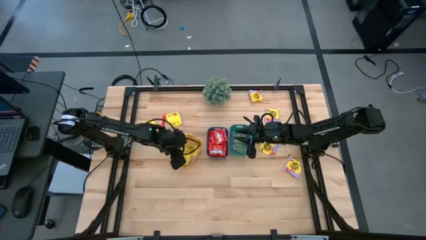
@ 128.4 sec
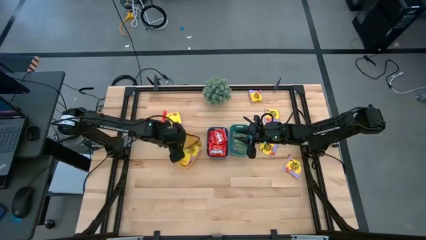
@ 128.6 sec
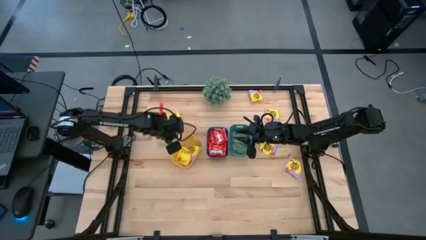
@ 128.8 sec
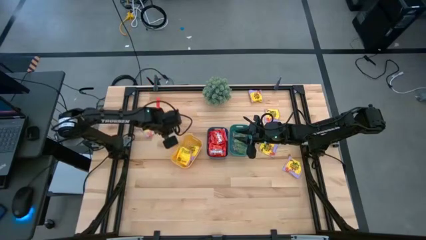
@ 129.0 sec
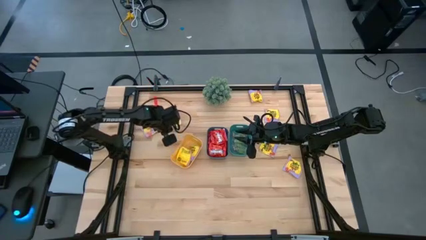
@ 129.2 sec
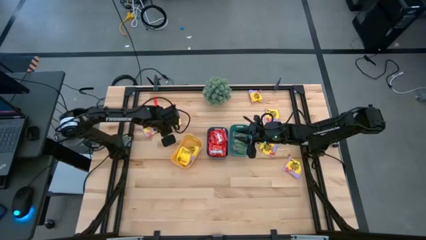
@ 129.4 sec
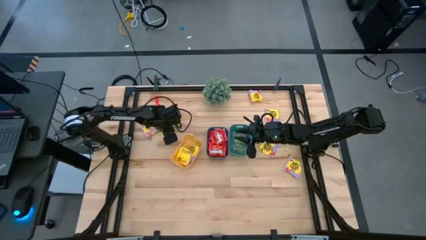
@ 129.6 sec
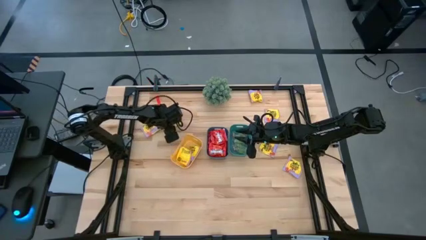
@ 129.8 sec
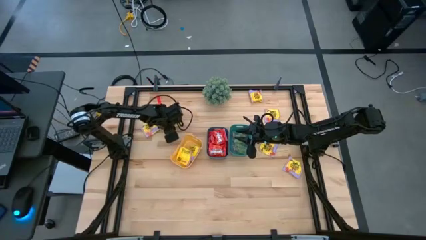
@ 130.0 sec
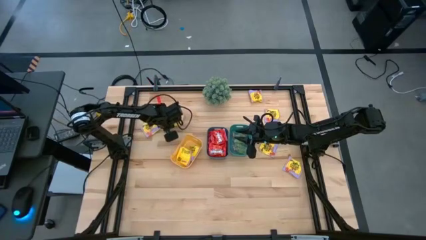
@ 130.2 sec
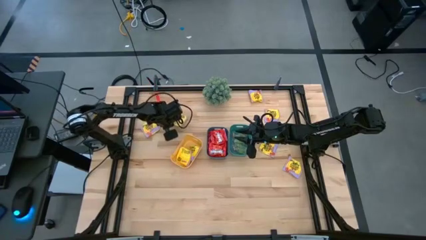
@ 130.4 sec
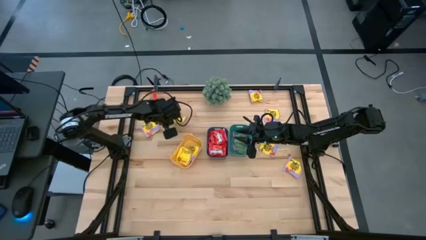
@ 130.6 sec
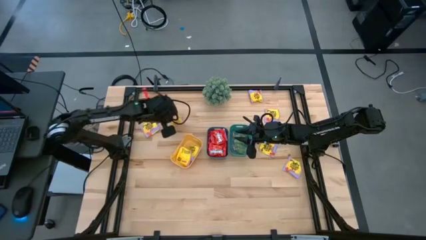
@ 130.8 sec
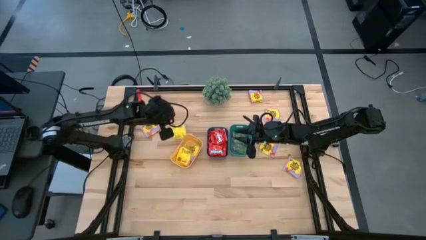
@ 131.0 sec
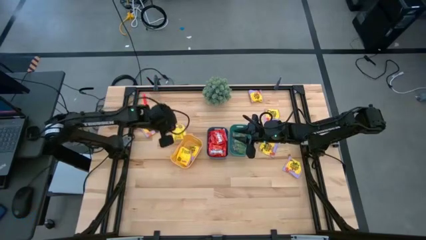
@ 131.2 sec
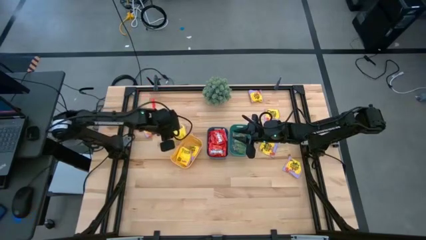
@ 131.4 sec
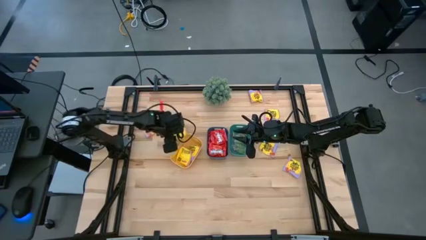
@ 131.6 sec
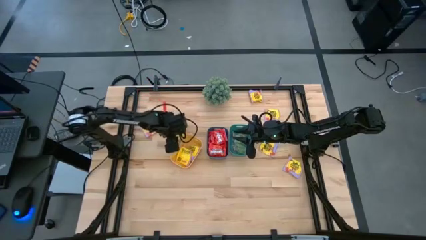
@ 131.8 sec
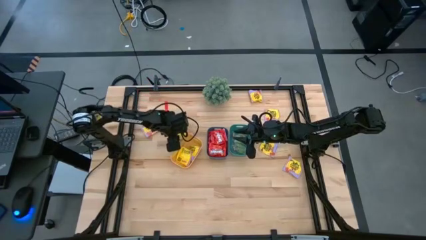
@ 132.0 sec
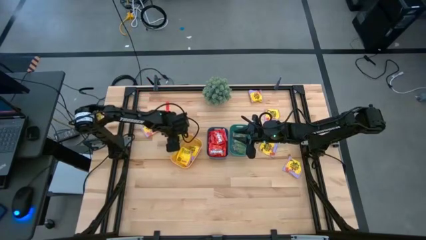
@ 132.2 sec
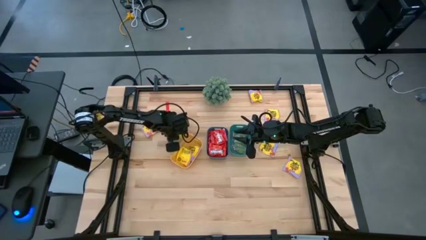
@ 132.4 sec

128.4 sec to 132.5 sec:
Task: Sort candy
Put the yellow candy pack into the yellow bin

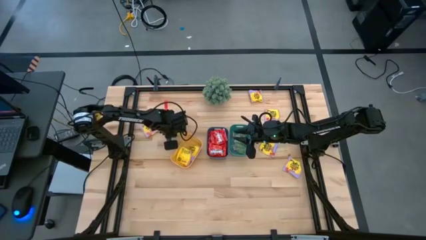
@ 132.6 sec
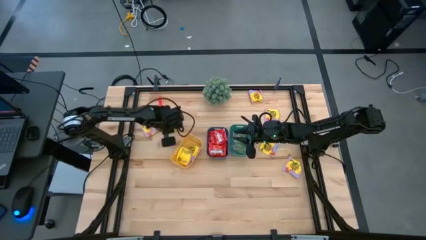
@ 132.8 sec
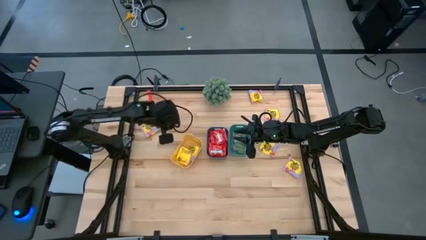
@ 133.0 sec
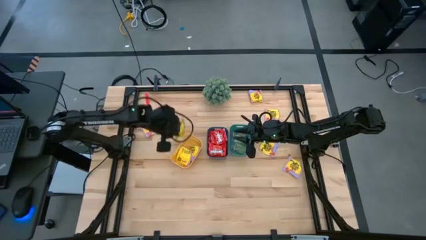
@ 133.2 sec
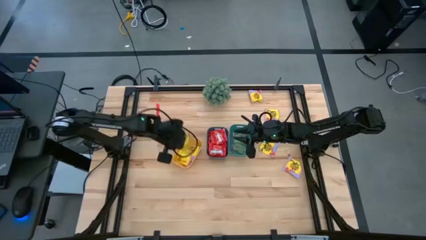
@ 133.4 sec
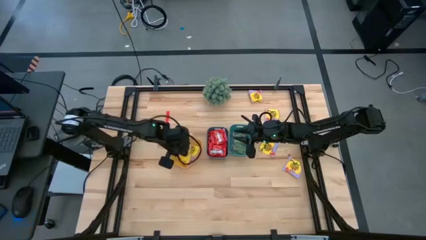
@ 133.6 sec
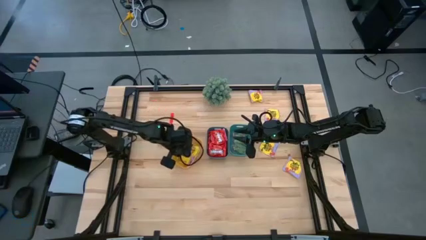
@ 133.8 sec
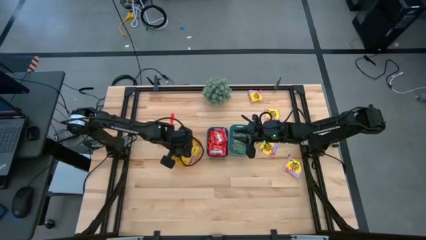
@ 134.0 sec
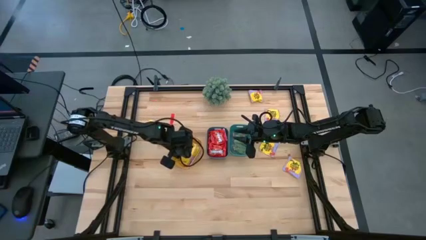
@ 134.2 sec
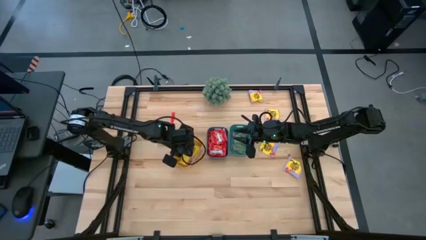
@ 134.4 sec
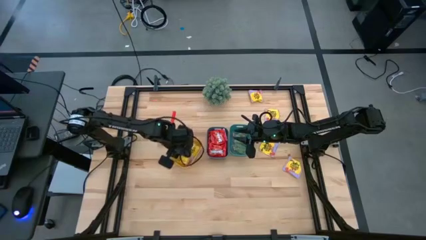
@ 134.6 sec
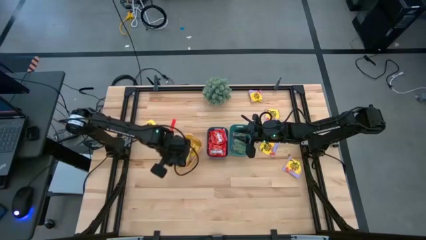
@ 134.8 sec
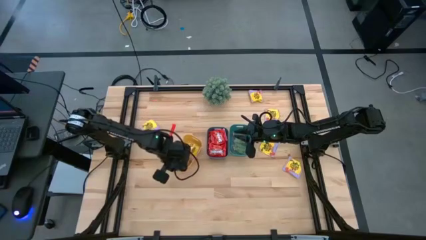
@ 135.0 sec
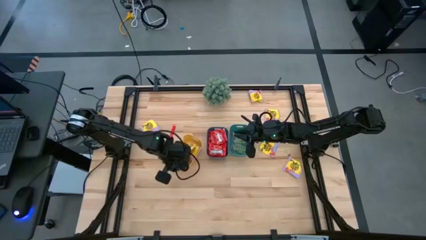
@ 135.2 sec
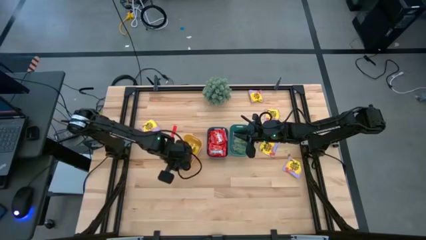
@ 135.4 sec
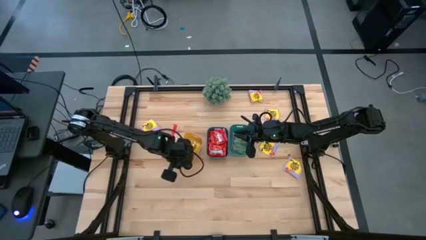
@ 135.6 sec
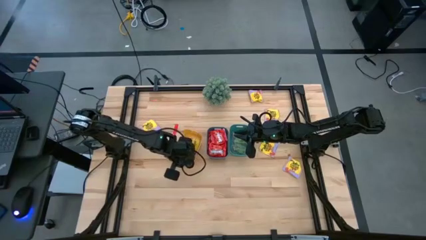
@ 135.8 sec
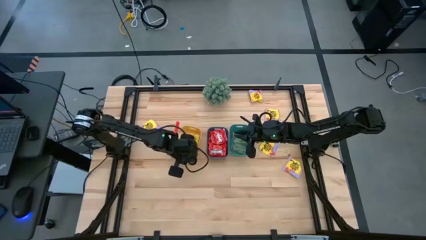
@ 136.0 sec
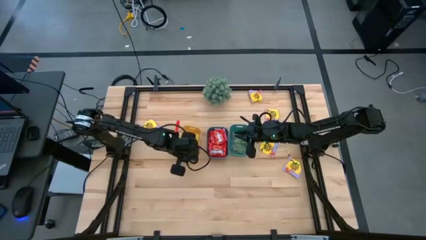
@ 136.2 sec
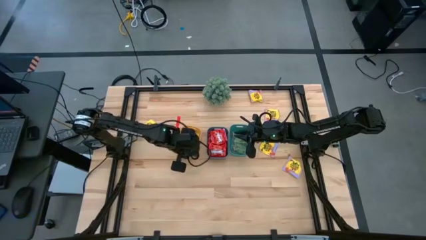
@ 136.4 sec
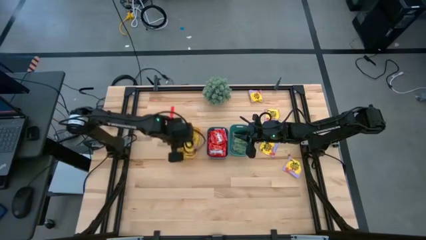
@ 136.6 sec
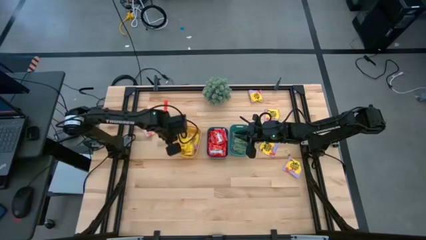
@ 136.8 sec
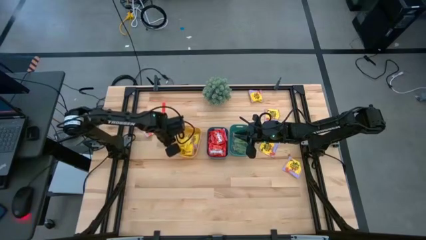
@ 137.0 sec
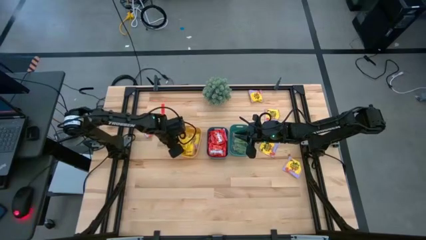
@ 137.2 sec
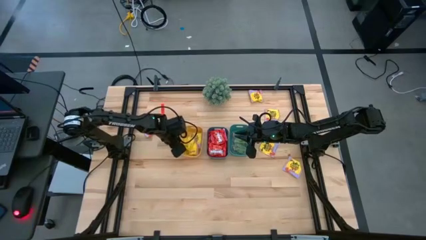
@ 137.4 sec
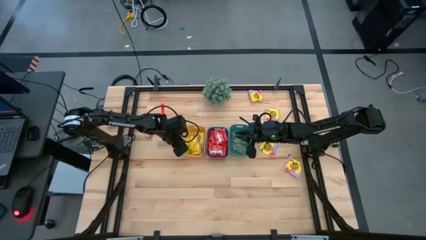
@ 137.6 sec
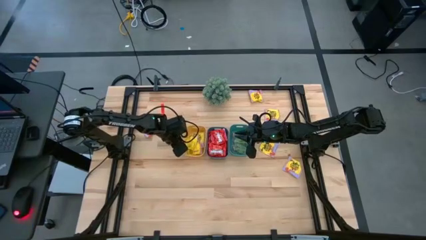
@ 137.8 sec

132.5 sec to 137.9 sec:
Put the yellow candy pack into the yellow bin

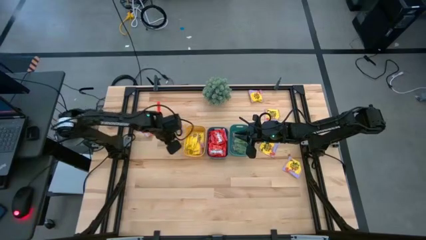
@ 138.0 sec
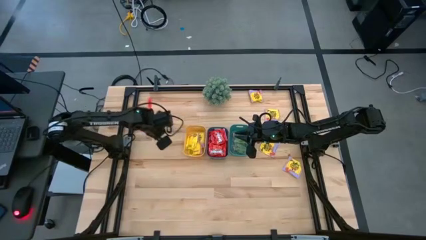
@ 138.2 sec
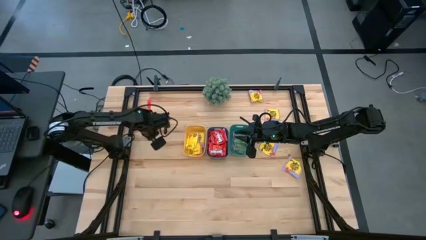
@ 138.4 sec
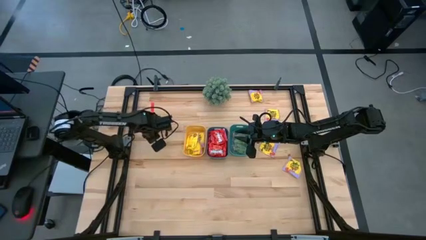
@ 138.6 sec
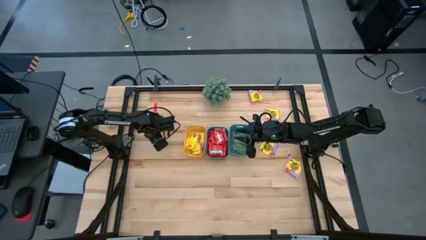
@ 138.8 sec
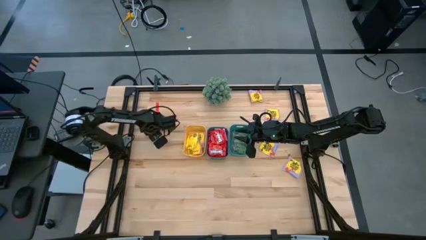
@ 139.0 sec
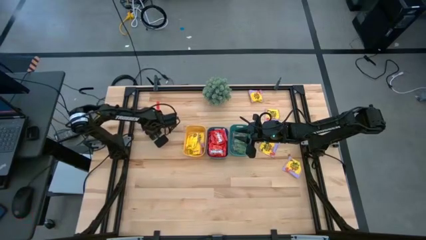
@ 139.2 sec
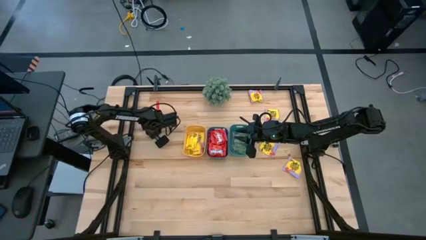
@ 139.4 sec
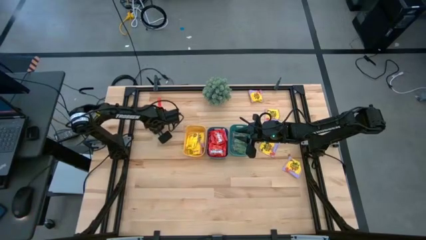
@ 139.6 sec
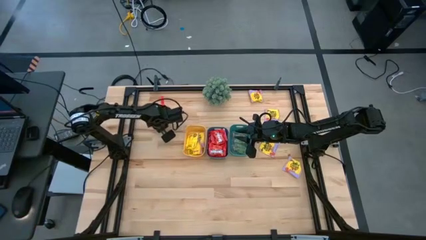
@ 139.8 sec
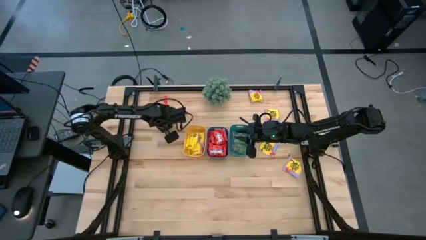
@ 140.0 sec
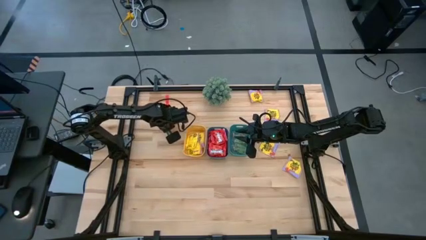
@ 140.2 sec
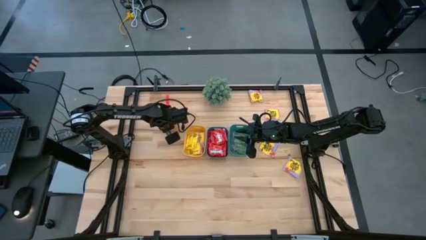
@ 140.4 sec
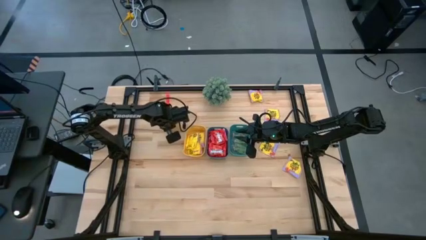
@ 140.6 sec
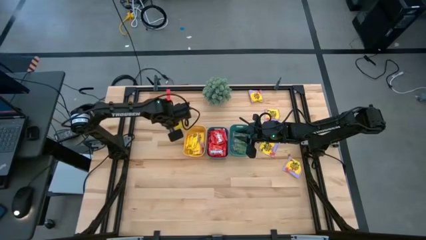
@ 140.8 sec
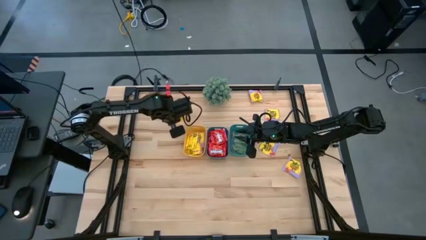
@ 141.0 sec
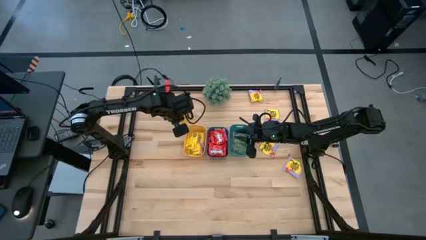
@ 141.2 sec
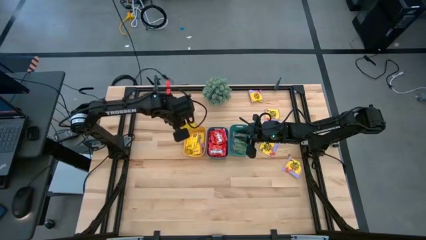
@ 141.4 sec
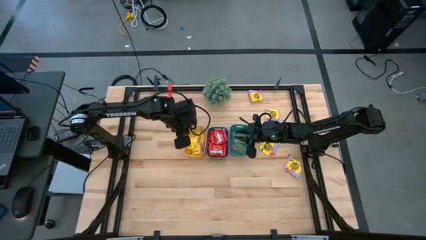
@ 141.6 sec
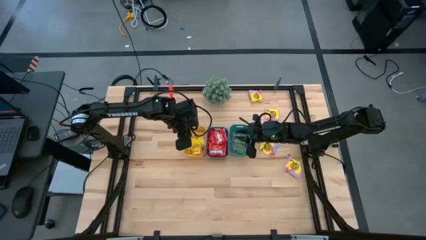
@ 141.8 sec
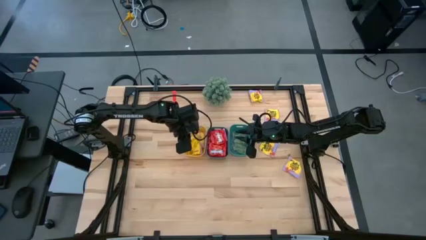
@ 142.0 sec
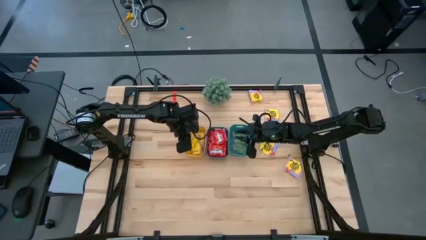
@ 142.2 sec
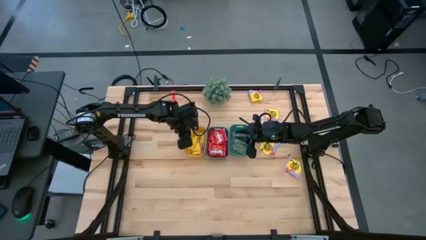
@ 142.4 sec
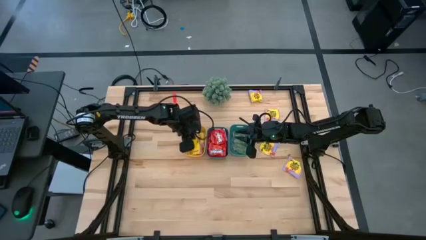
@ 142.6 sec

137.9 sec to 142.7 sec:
Put the yellow candy pack into the yellow bin

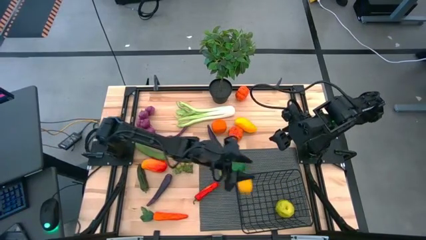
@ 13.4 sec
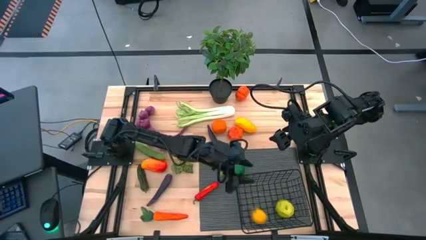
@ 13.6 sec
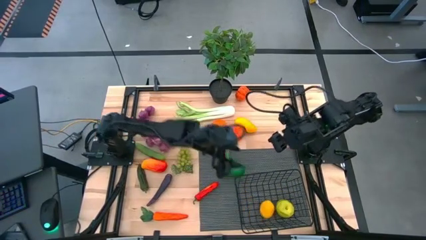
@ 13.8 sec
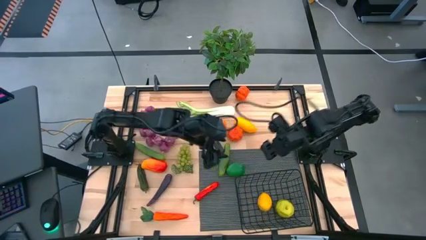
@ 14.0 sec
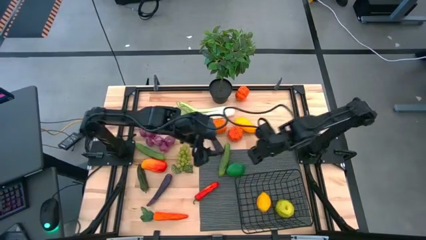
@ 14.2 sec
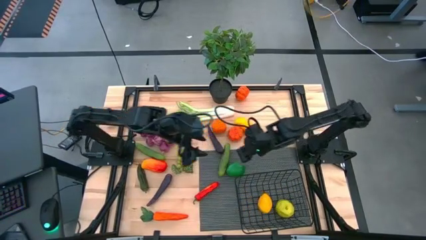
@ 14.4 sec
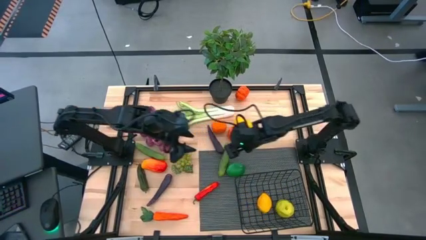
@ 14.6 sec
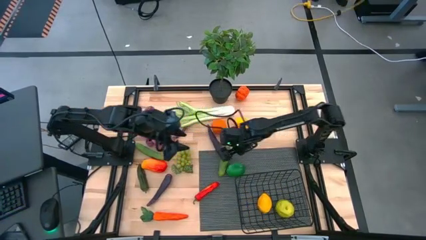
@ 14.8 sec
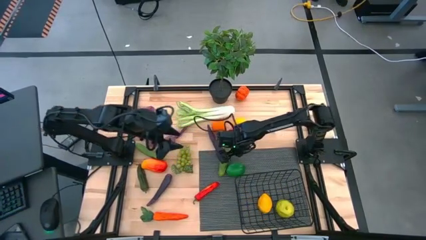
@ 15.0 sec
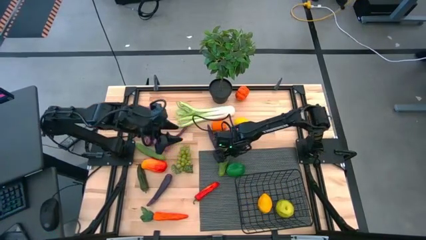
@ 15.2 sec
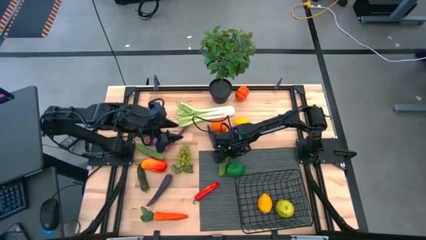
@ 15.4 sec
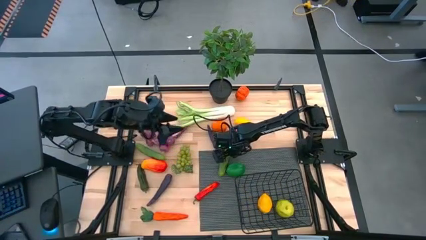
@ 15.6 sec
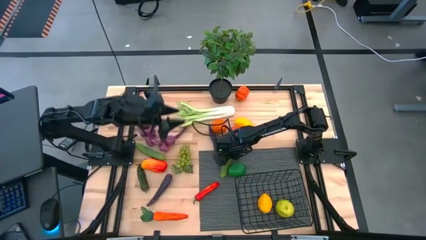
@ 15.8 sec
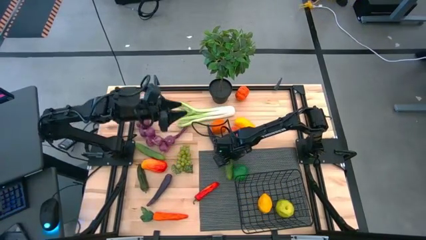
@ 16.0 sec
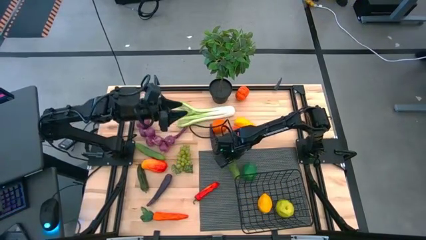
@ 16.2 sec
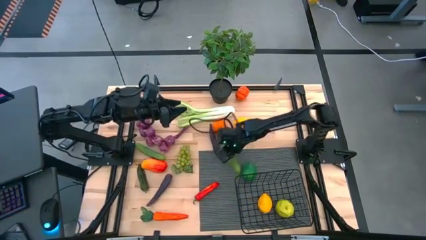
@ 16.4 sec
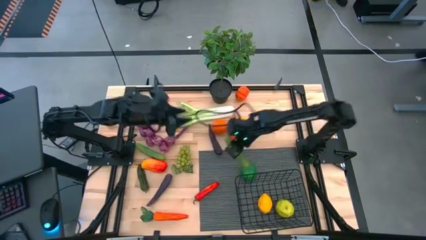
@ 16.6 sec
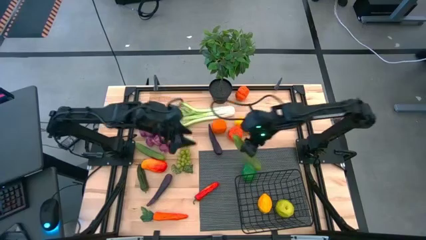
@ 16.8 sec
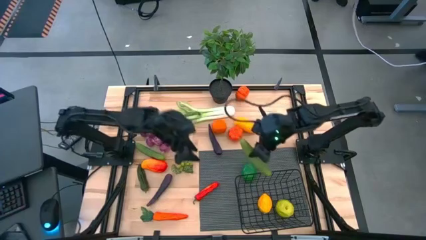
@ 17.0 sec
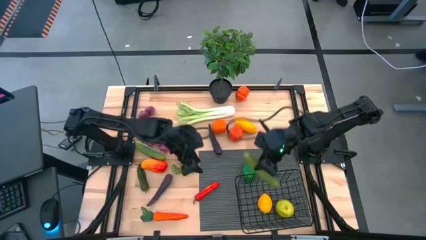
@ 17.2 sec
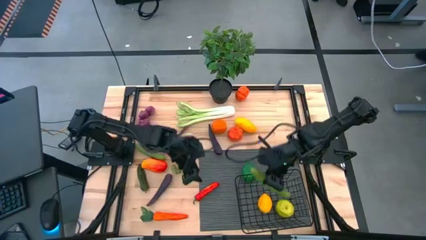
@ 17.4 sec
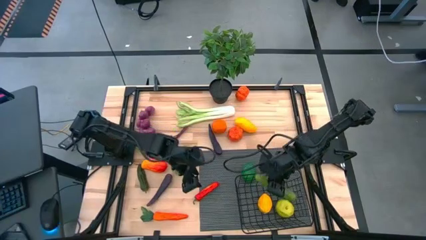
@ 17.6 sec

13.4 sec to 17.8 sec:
Task: Build produce basket
Put the right green cucumber into the black wire basket
